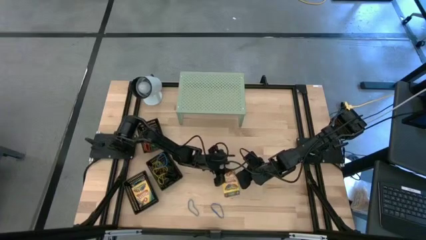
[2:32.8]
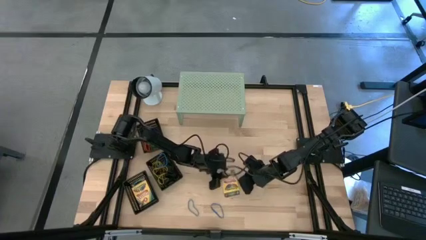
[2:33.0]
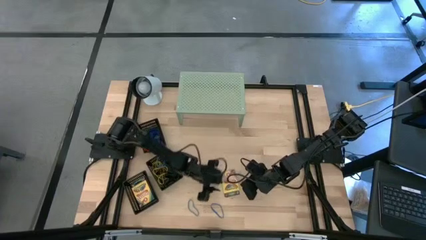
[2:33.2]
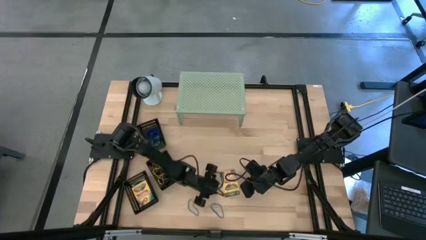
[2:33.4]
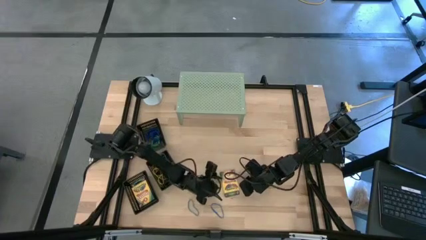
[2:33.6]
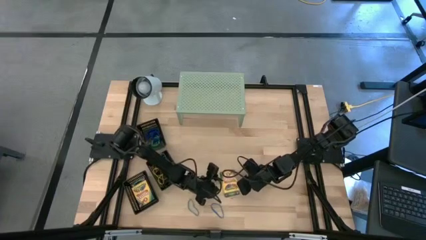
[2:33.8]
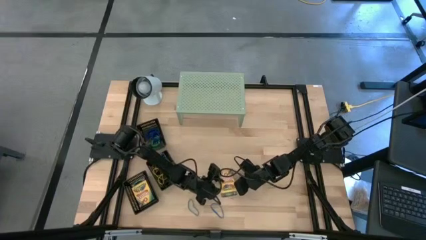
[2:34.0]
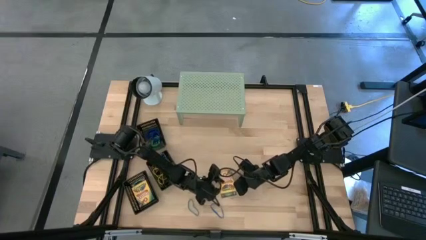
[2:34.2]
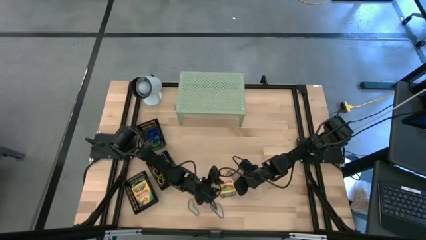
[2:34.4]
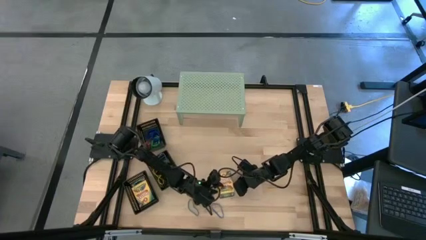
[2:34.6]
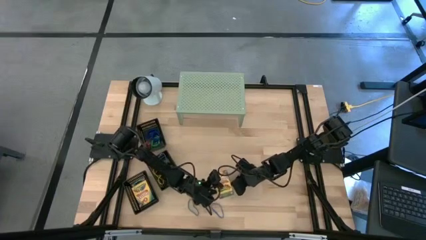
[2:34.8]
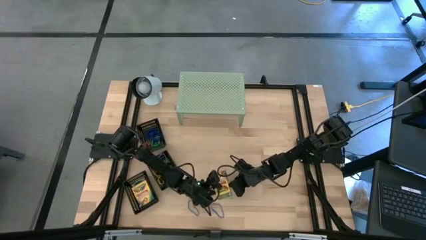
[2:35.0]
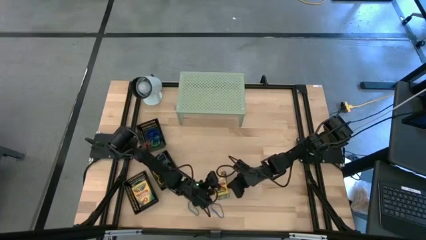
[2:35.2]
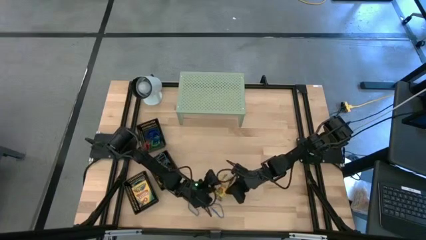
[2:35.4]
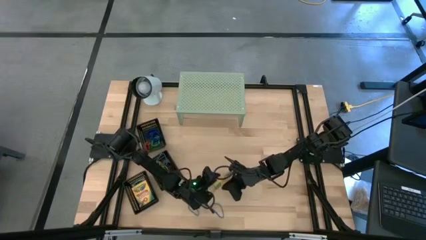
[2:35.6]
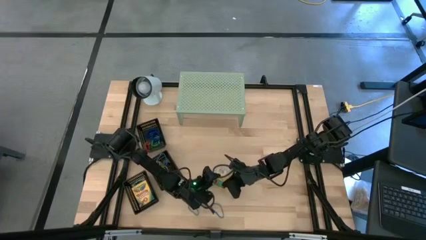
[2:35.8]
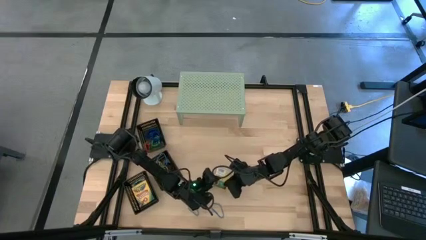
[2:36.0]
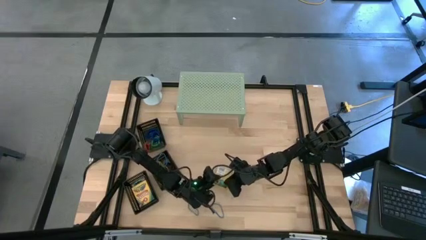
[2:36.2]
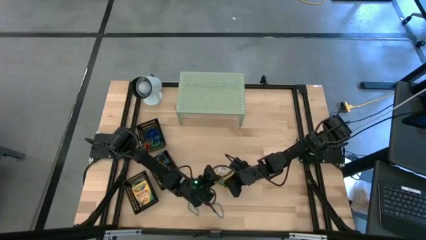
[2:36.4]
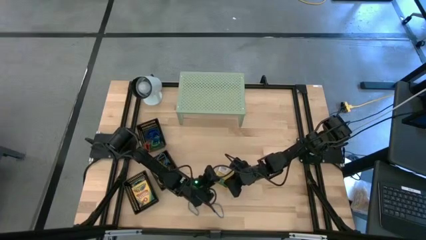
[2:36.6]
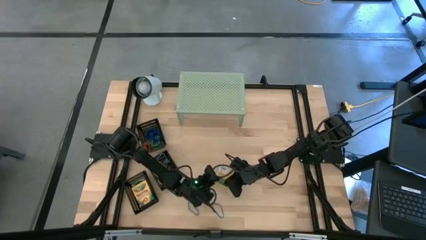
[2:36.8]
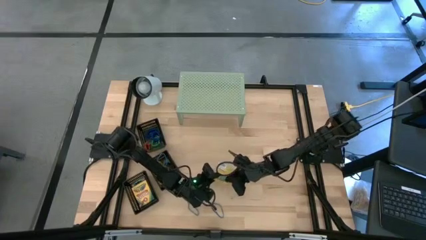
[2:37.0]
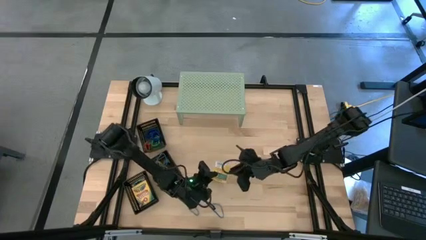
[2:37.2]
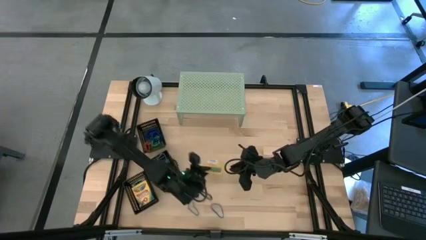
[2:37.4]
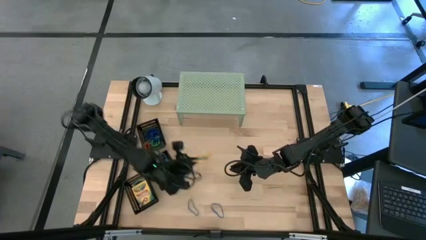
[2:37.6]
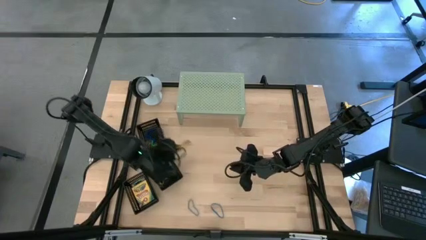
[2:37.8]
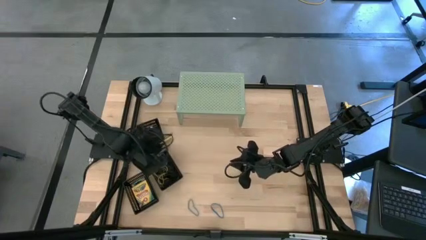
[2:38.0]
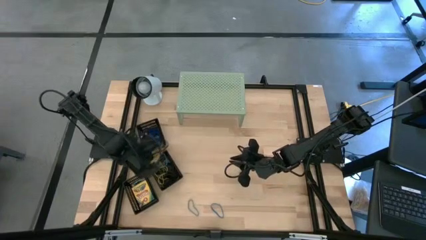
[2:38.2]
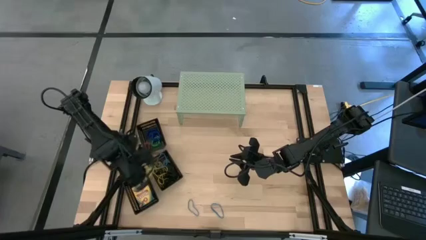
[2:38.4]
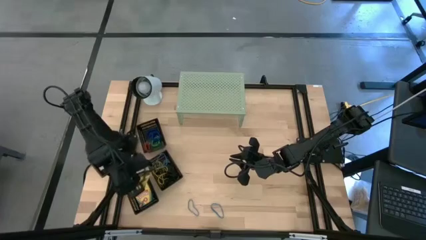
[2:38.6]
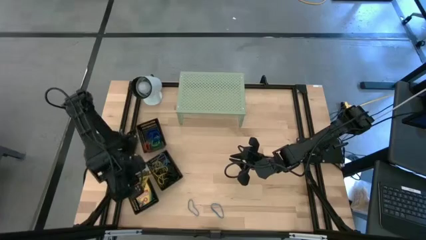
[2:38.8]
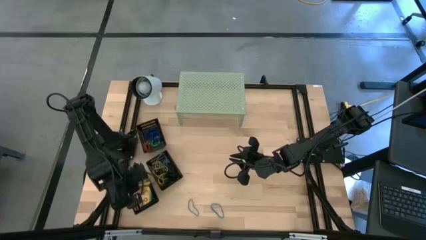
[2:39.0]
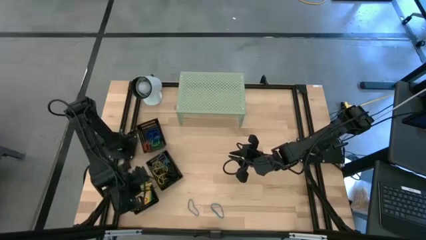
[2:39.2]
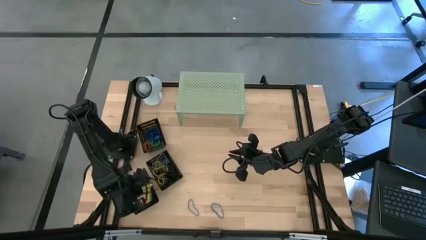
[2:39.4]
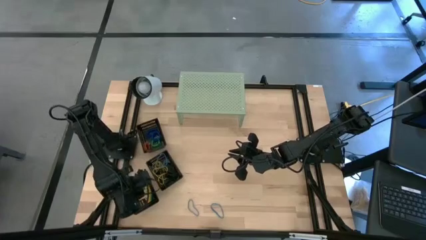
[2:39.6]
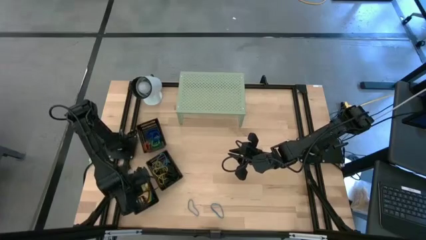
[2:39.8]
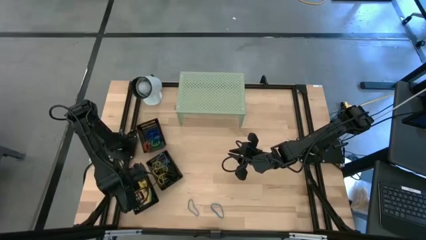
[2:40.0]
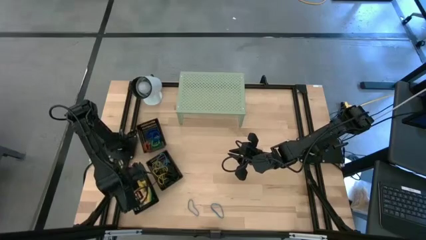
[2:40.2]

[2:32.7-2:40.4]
Task: Pick & Place Office Desk Supplies
Put the crayon box into the bottom black bin

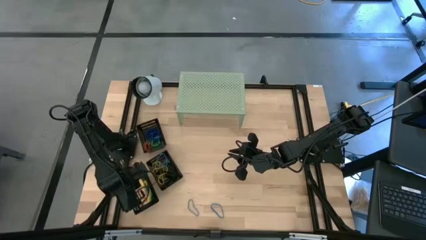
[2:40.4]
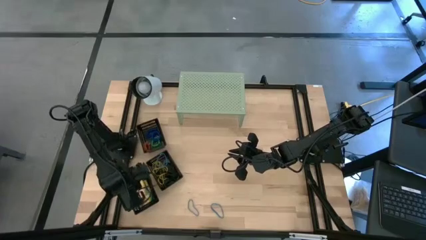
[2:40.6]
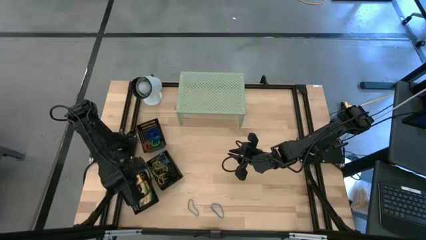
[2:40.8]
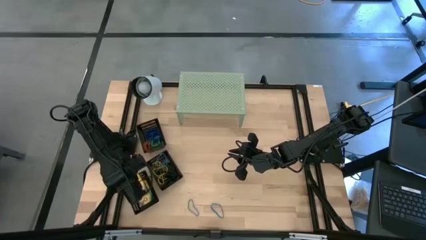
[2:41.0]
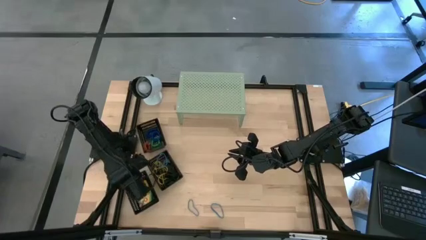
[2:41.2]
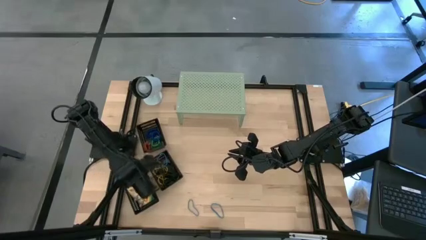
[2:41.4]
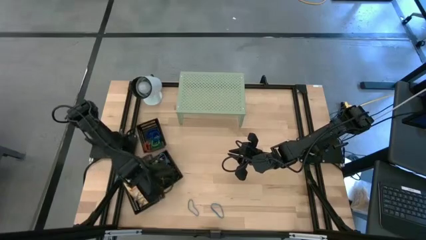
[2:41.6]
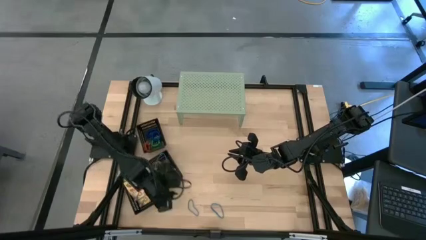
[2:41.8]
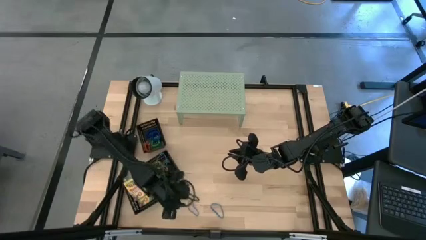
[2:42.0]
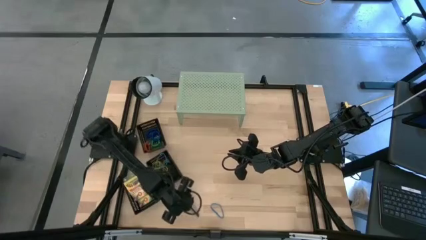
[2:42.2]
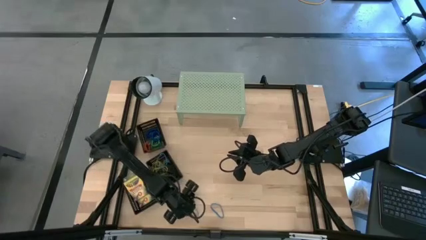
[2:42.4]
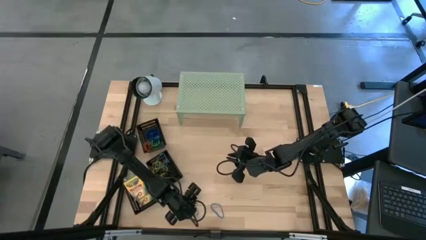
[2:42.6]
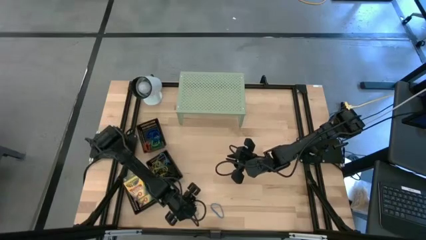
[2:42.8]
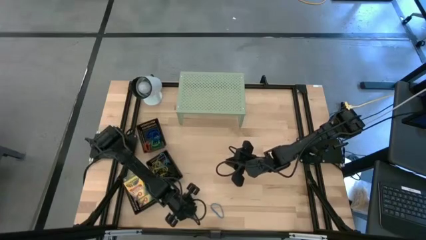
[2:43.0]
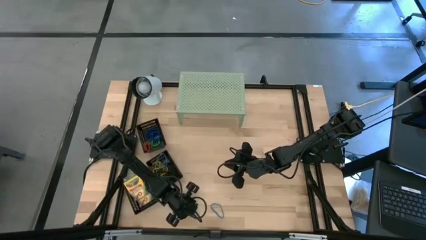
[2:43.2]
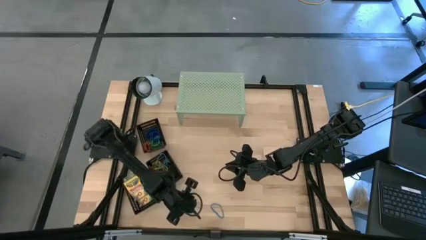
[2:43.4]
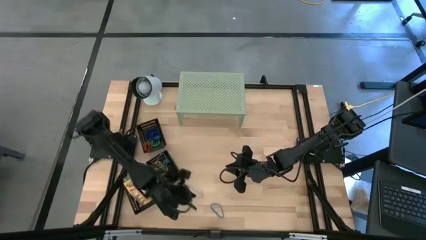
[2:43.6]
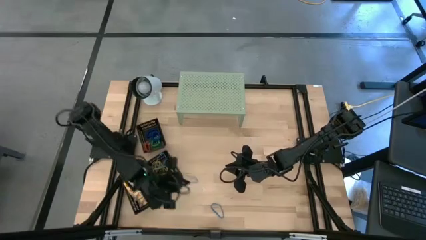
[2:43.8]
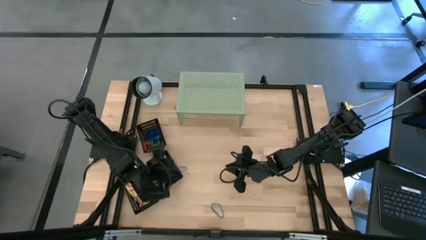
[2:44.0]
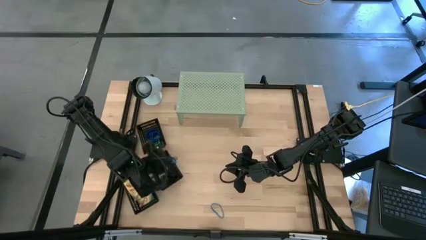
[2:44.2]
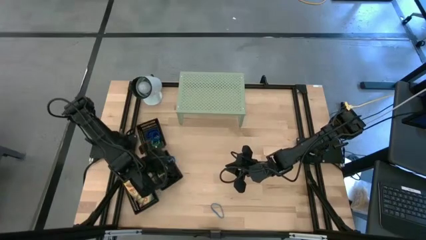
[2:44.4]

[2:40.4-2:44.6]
Put the blue rubber band into the middle black bin

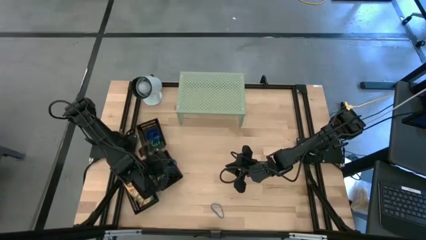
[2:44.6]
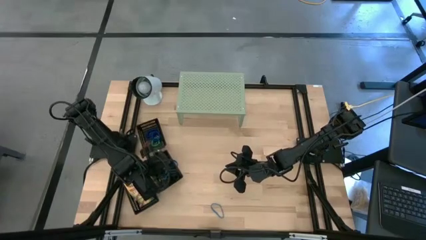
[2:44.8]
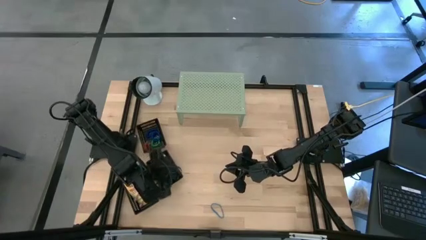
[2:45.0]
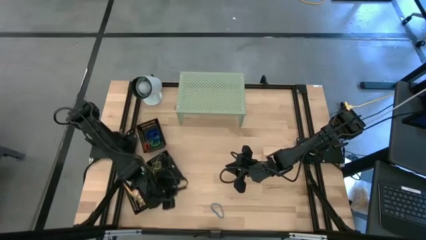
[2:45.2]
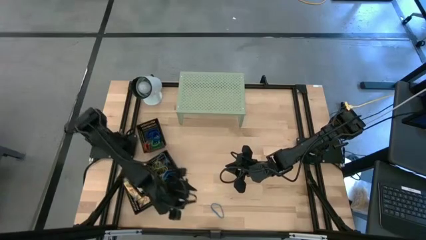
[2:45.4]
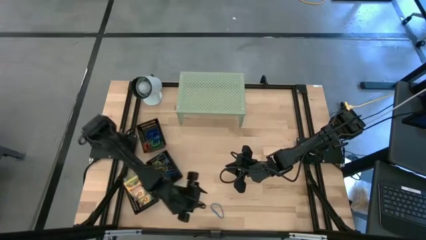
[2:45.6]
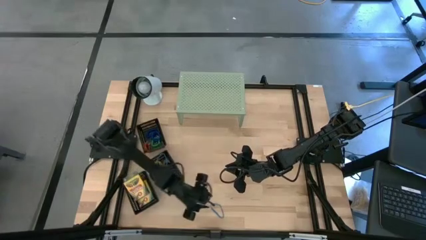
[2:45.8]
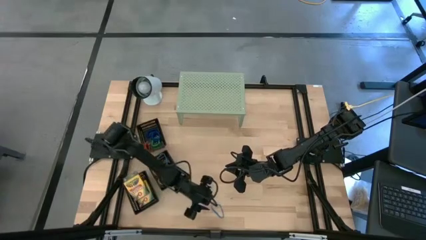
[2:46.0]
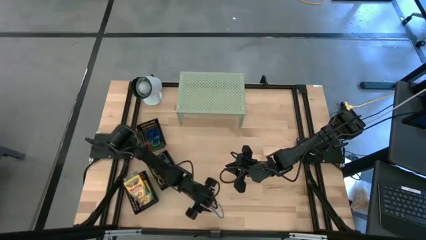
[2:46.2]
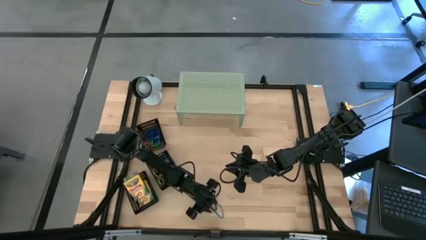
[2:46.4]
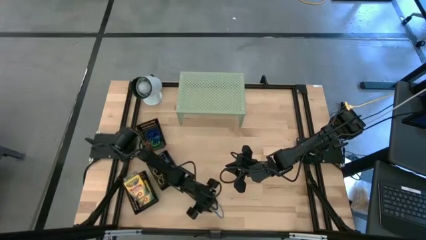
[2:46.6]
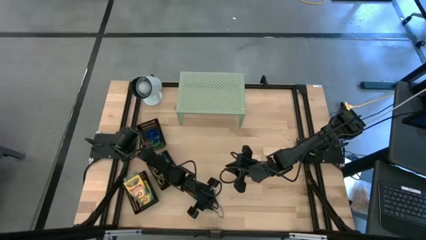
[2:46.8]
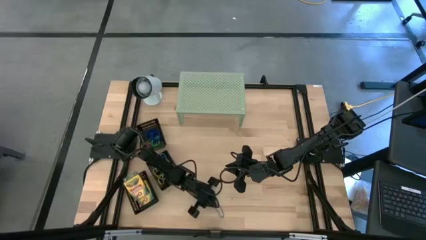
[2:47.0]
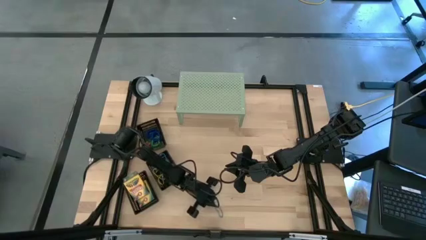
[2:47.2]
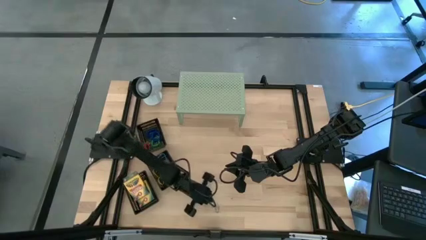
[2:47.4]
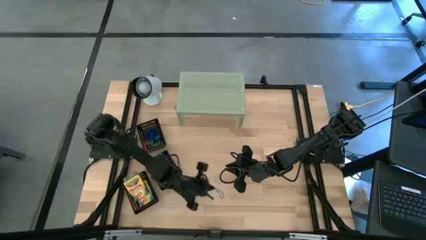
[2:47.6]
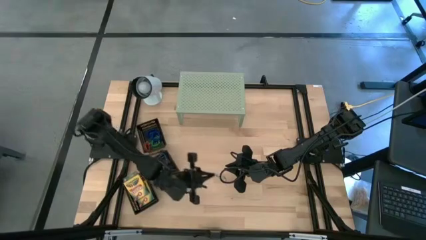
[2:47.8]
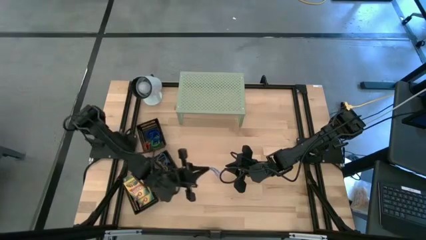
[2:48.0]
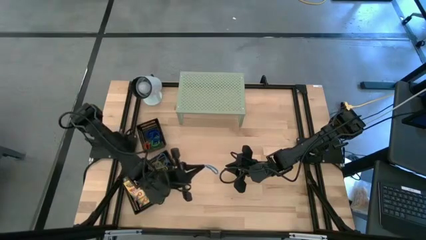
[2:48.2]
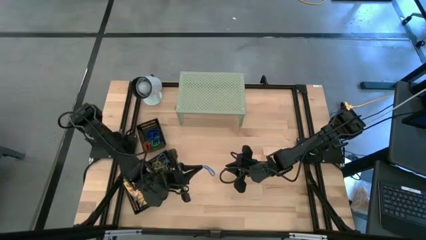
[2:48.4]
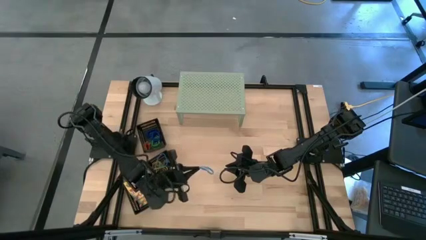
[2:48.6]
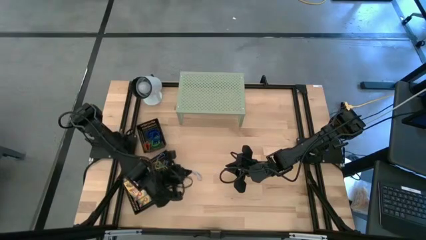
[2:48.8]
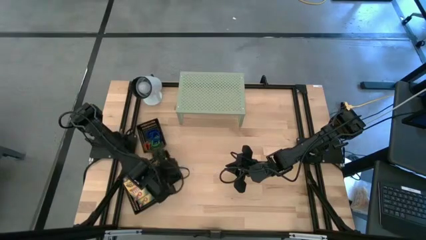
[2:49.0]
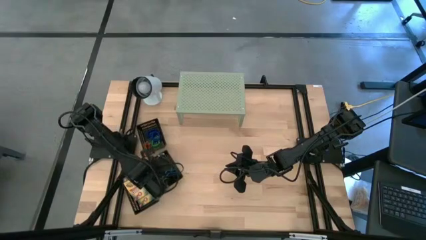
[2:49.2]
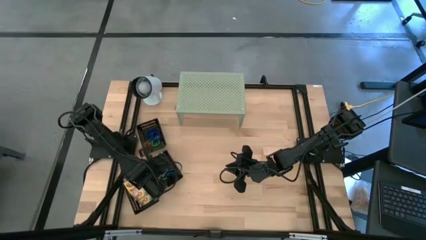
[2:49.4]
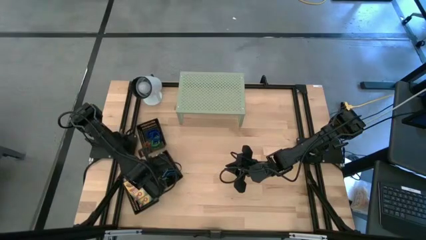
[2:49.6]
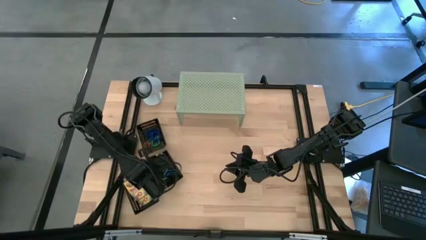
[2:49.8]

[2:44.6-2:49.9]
Put the blue rubber band into the middle black bin
